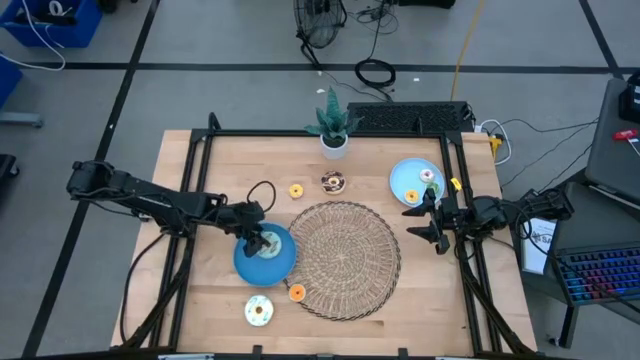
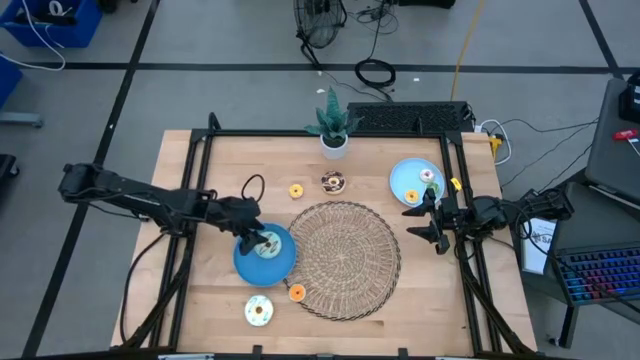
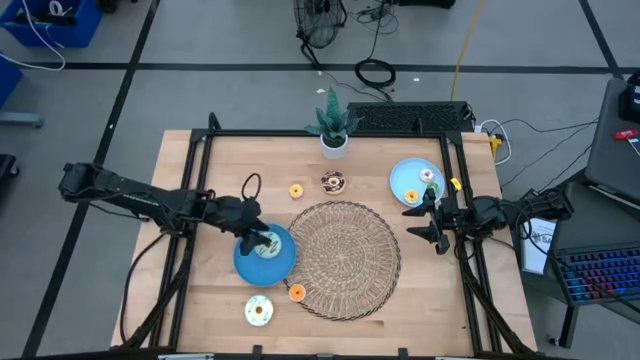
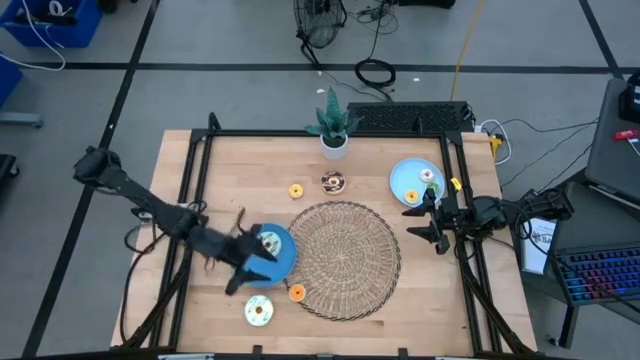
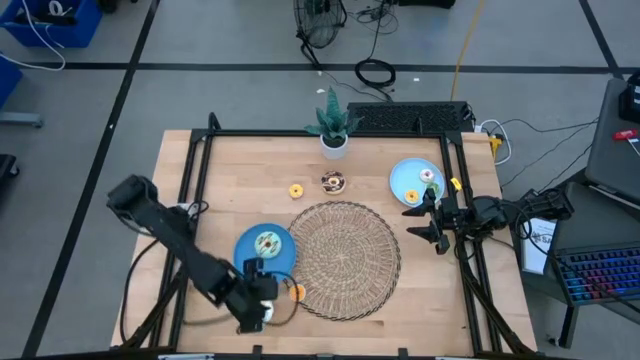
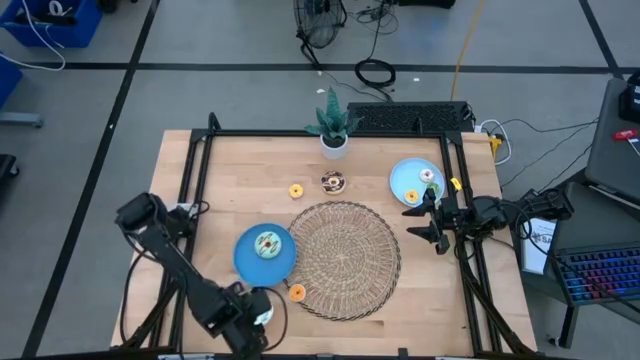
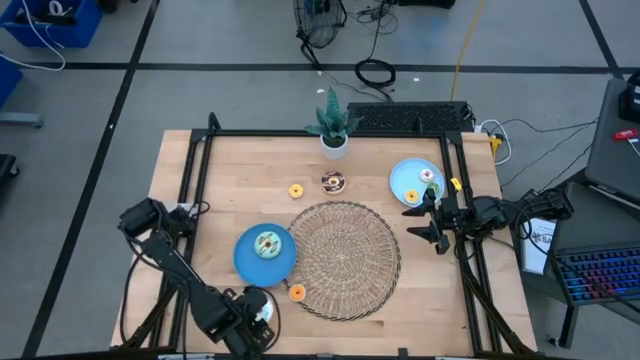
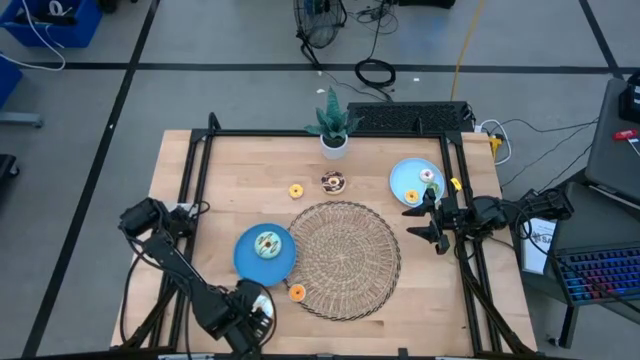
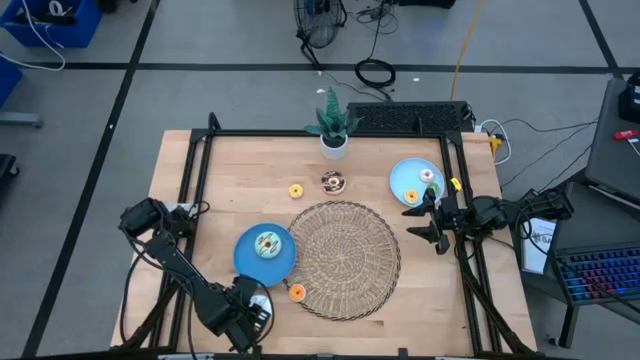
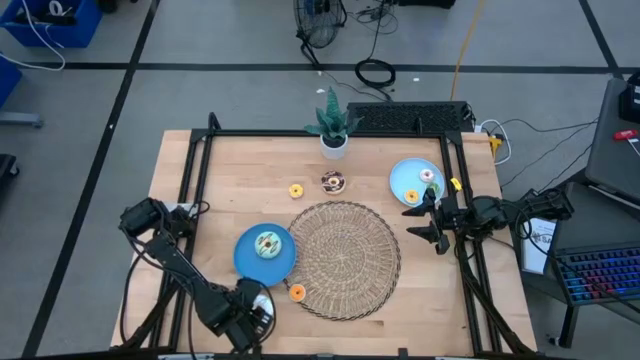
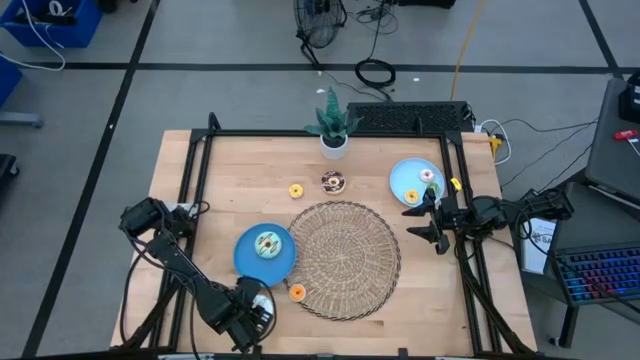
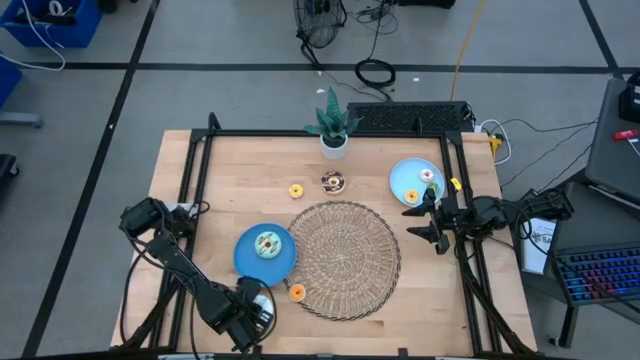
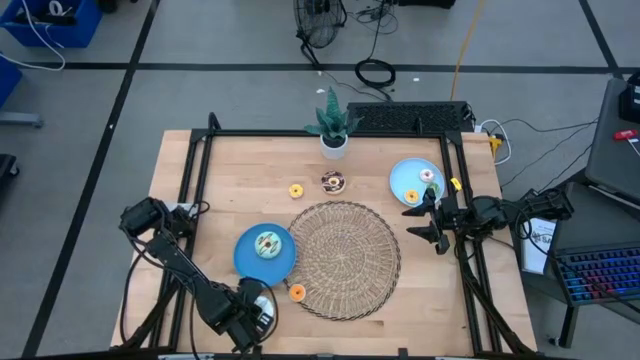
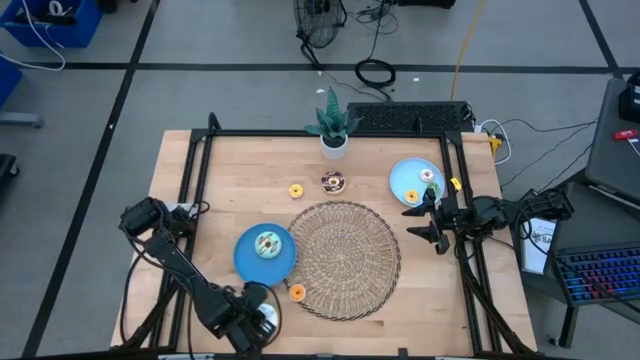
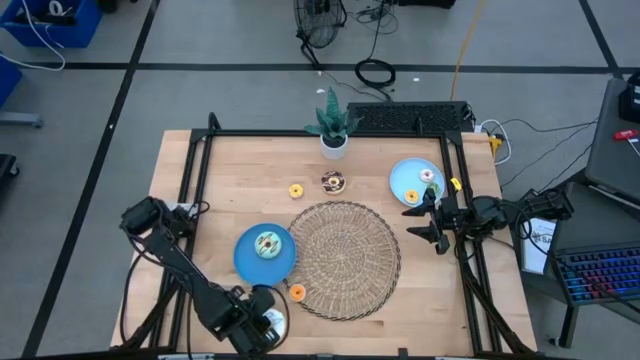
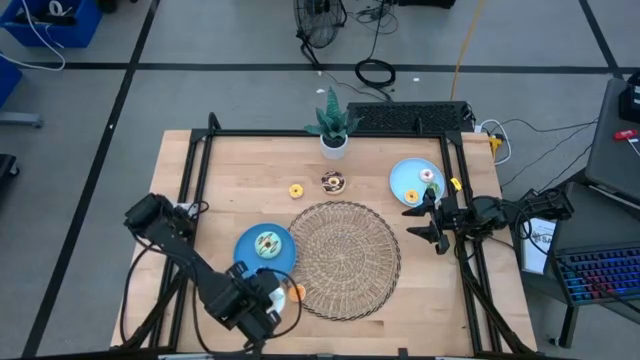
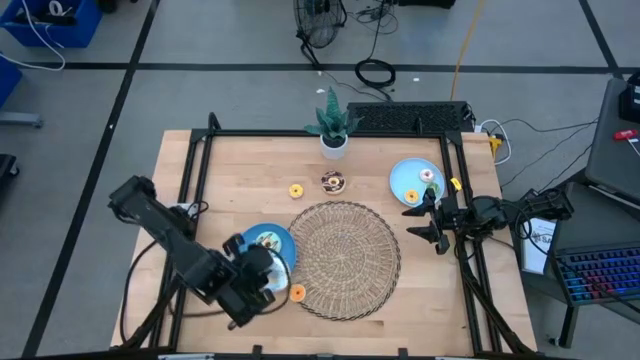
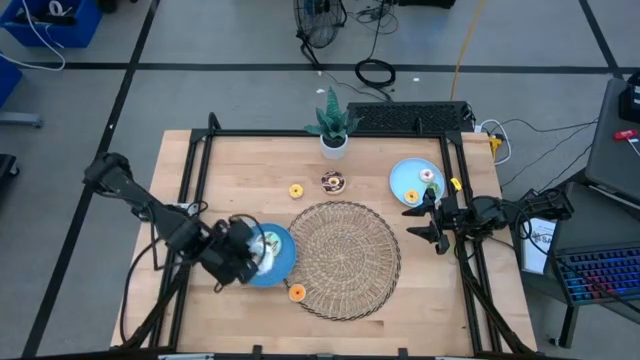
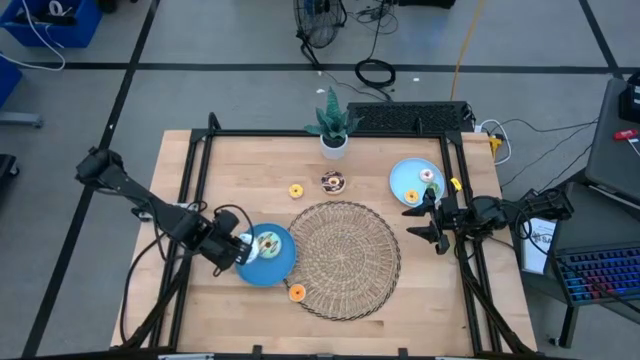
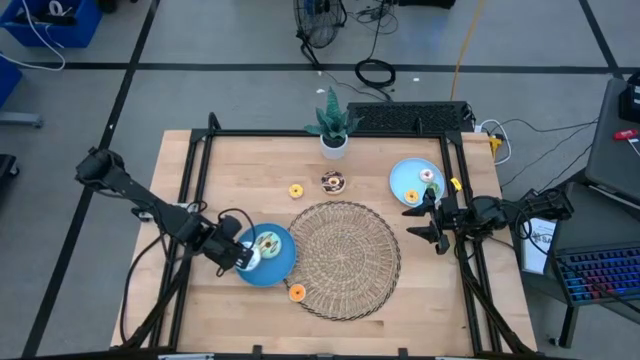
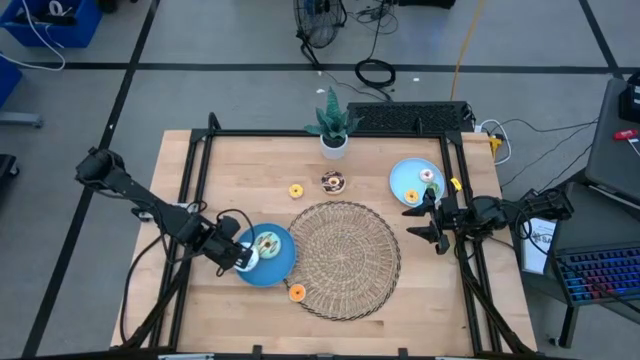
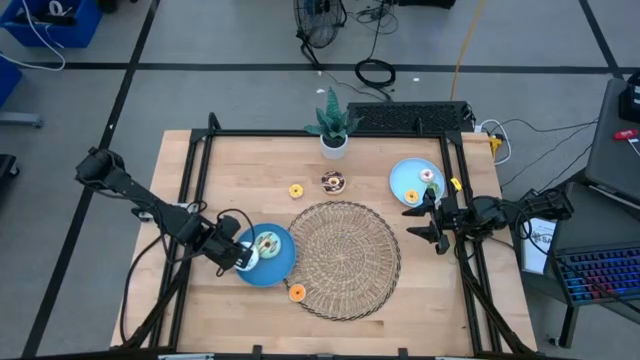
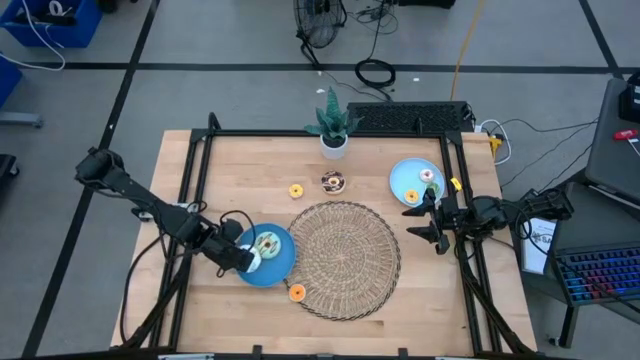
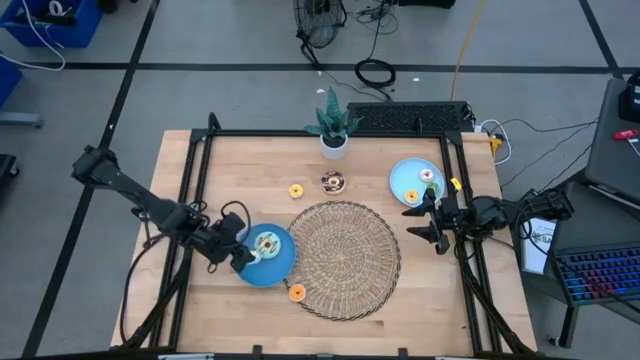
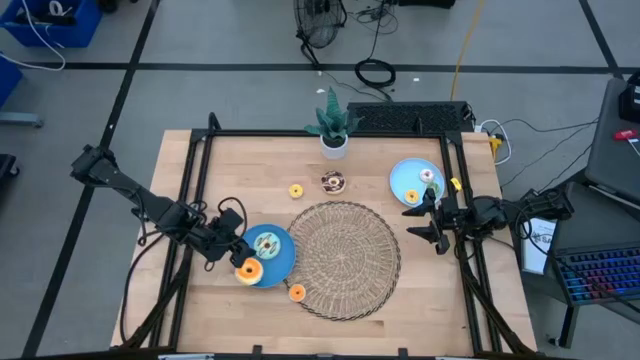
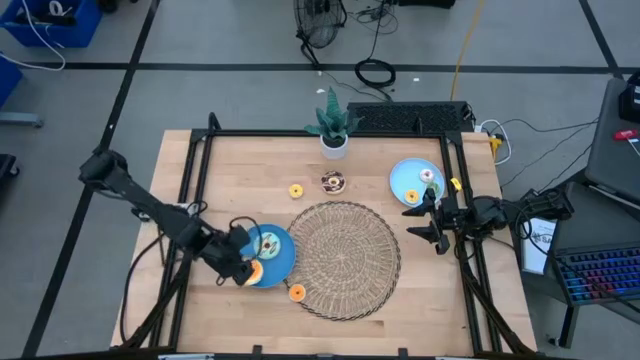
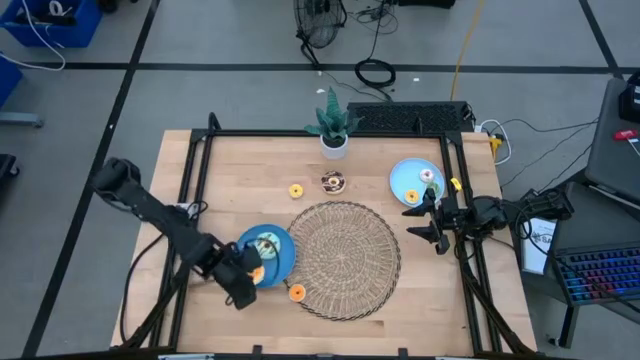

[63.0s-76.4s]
Task: Pick & Place donuts
Put the large white donut on the blue plate

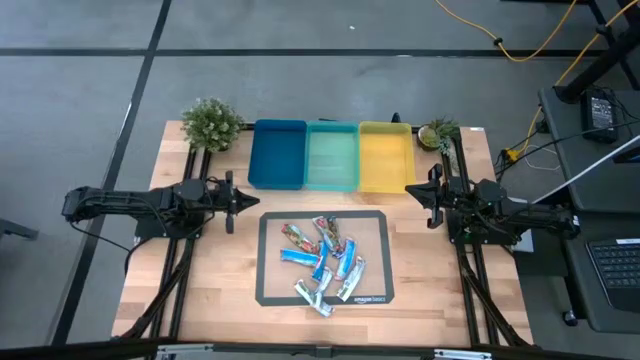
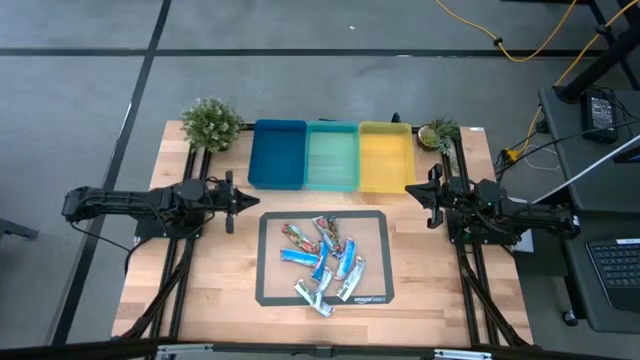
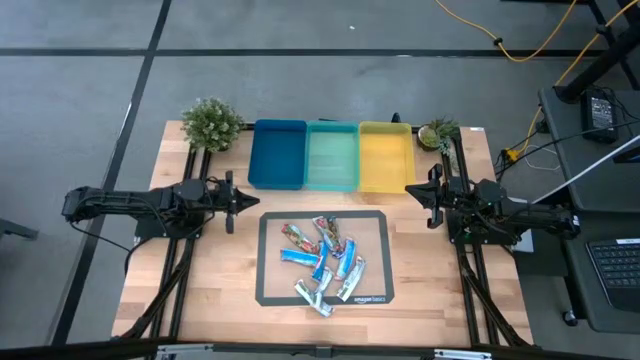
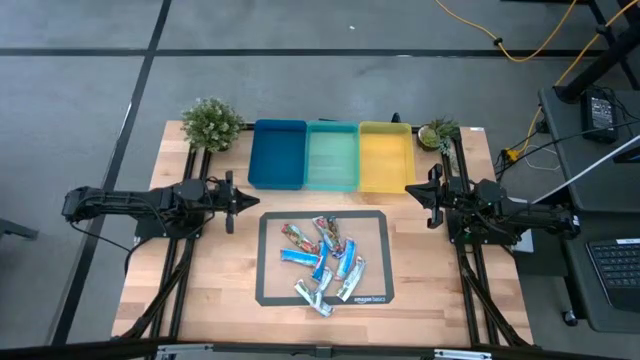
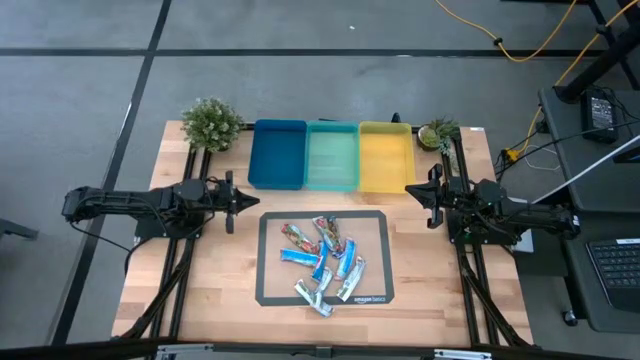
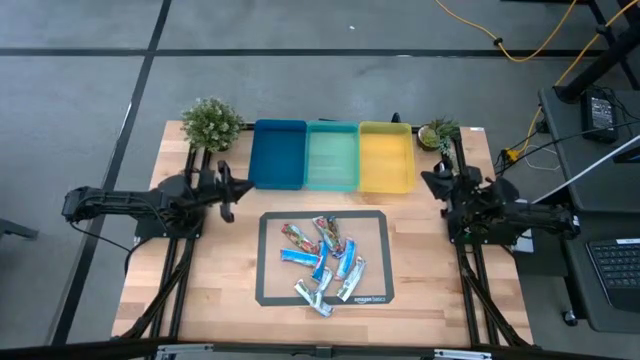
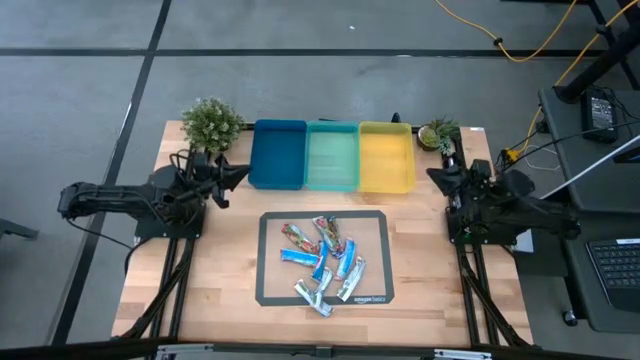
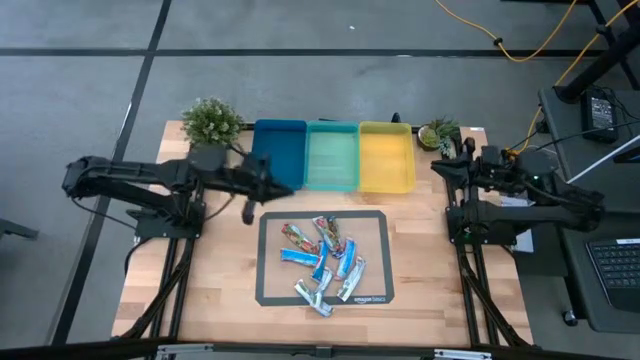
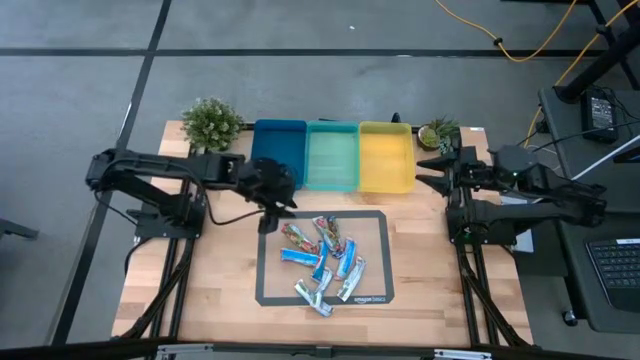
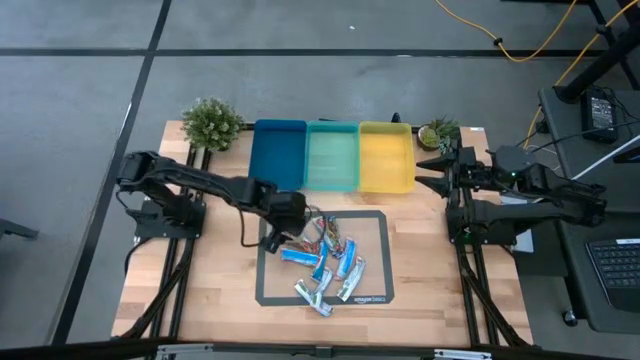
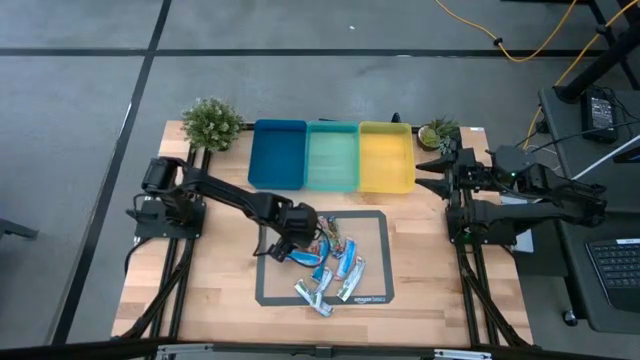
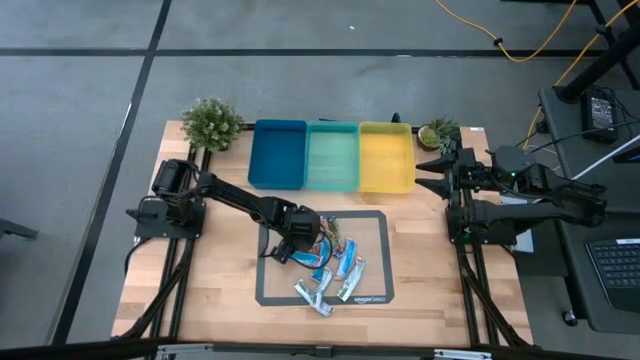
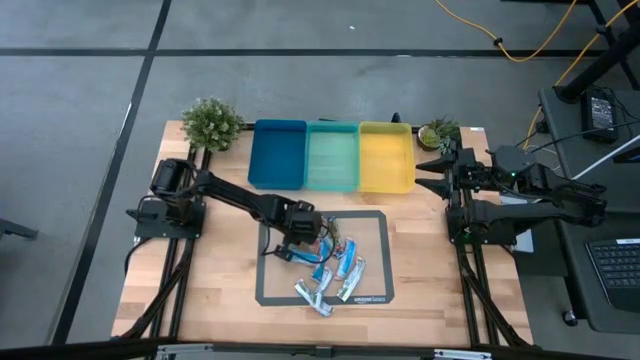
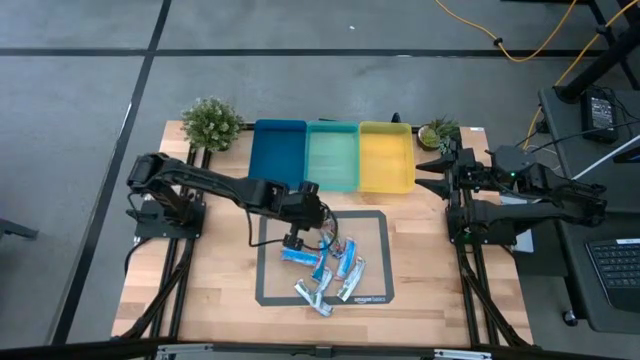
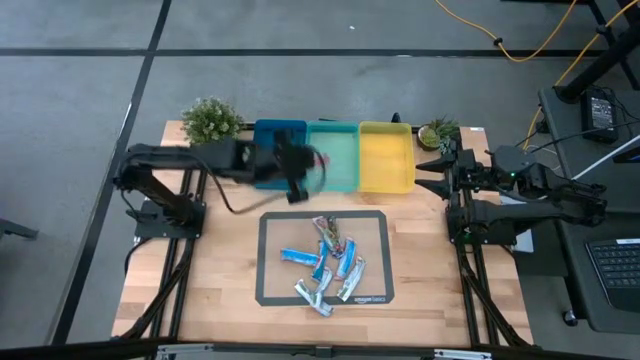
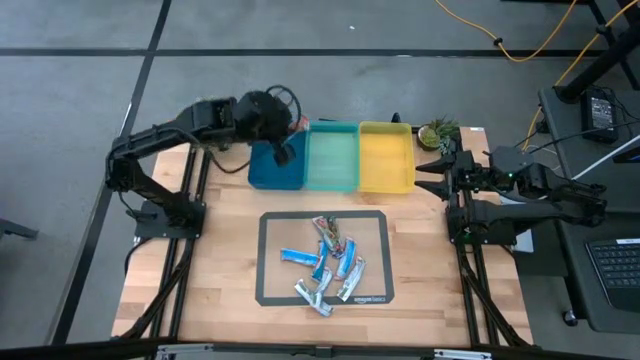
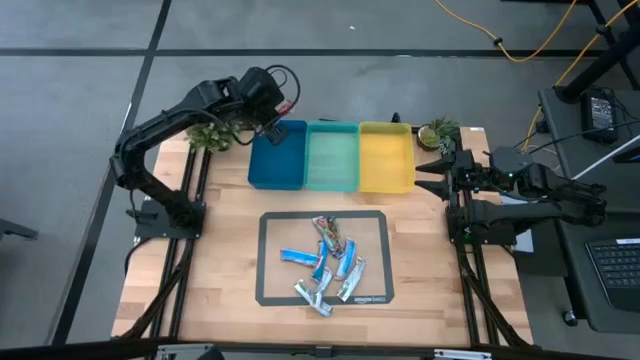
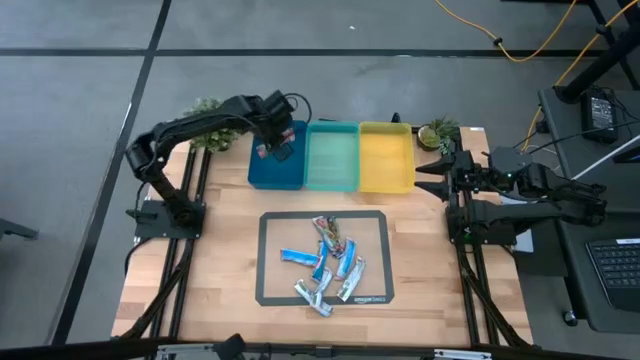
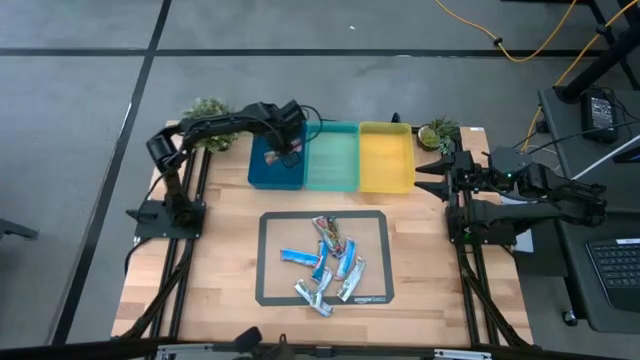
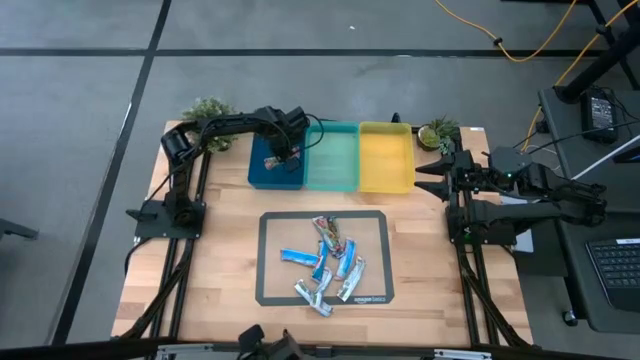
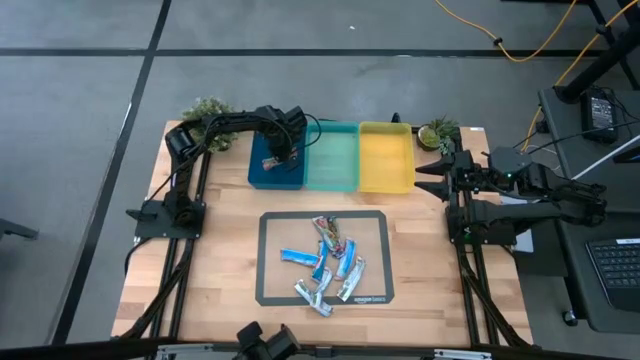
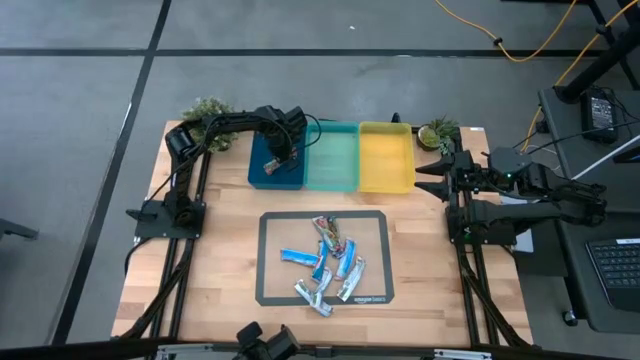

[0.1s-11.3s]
Task: Pick and place Granola Bars by type
Put the red granola bar into the blue bin
